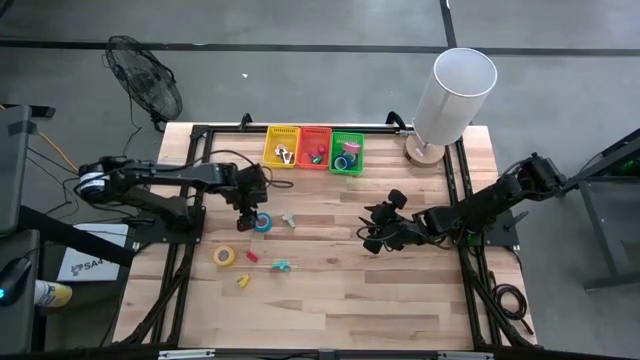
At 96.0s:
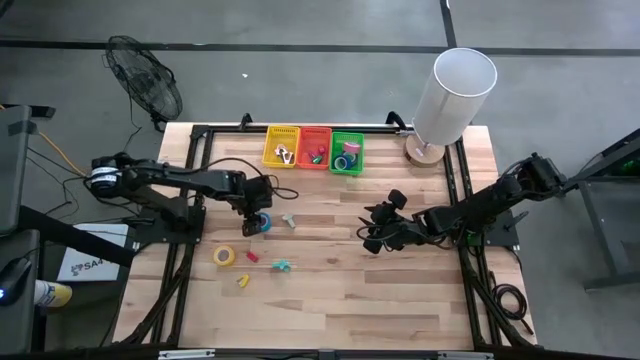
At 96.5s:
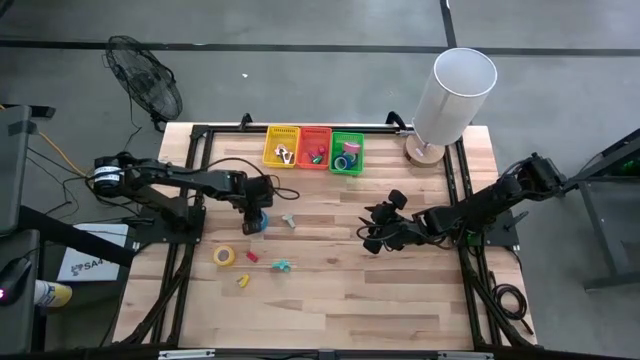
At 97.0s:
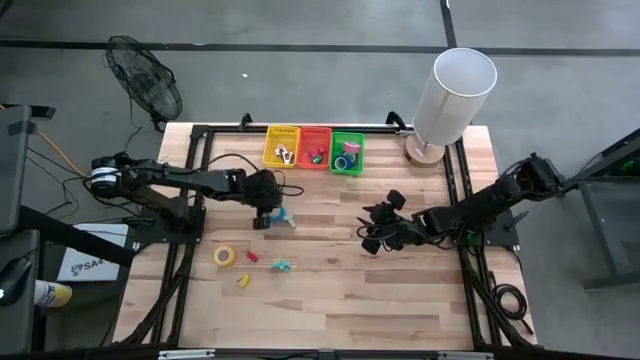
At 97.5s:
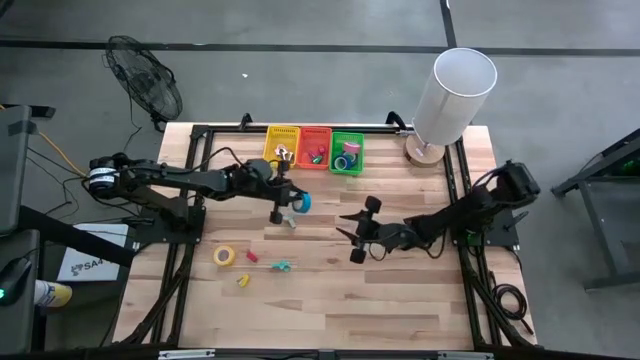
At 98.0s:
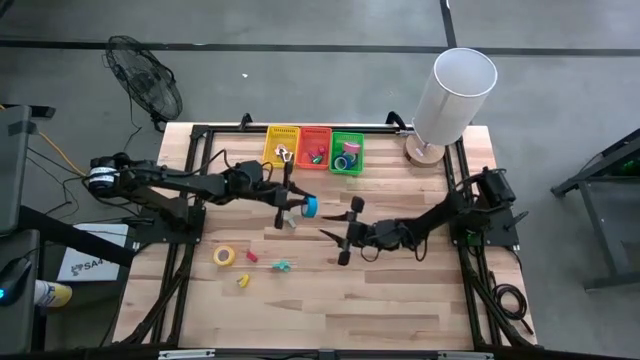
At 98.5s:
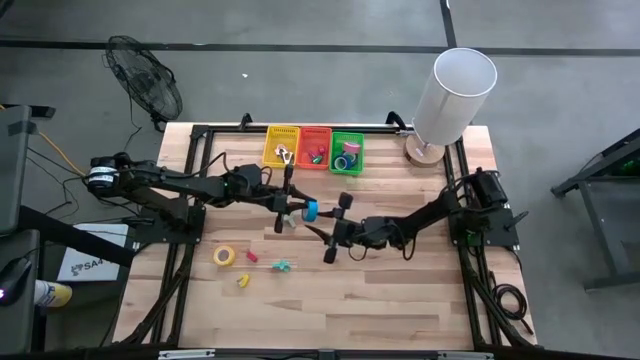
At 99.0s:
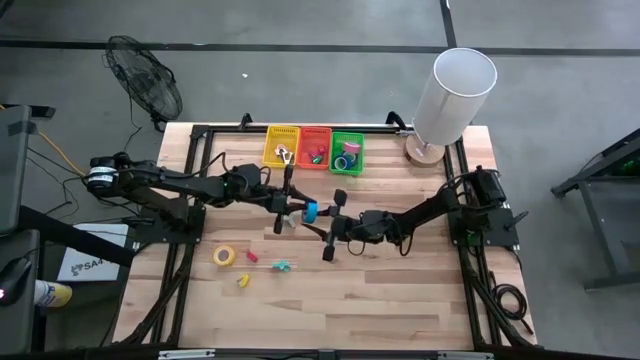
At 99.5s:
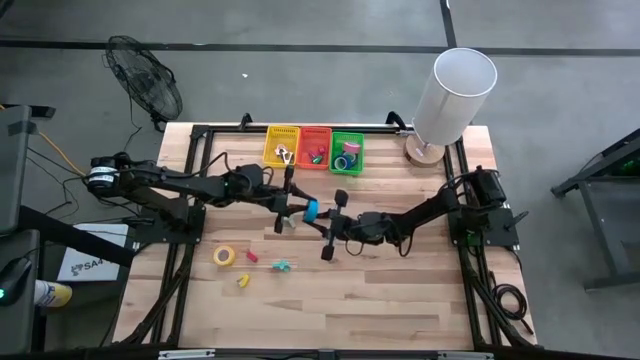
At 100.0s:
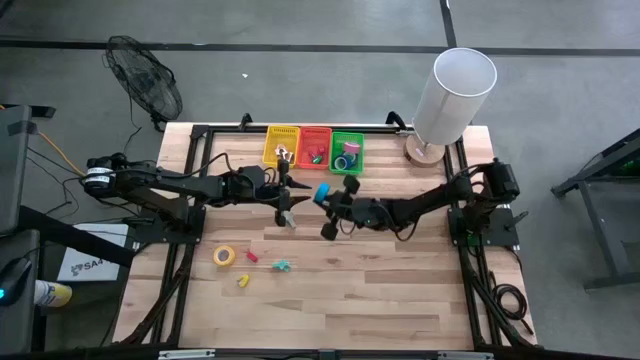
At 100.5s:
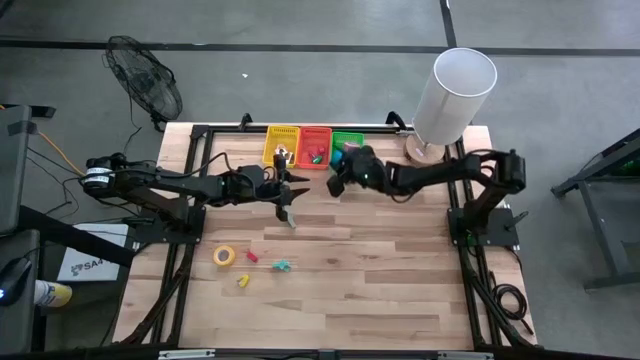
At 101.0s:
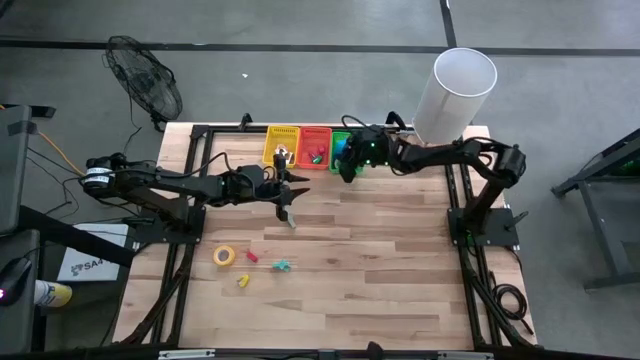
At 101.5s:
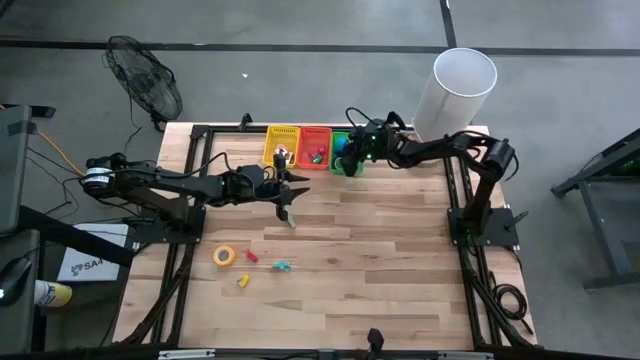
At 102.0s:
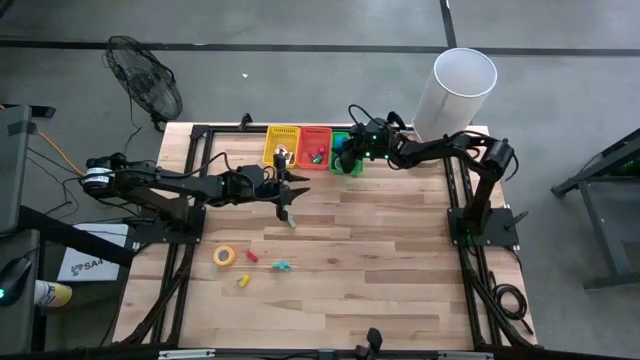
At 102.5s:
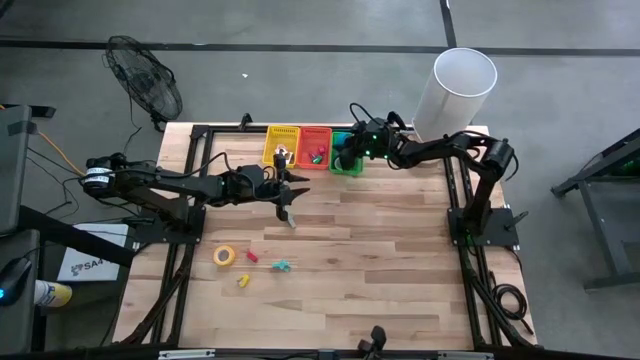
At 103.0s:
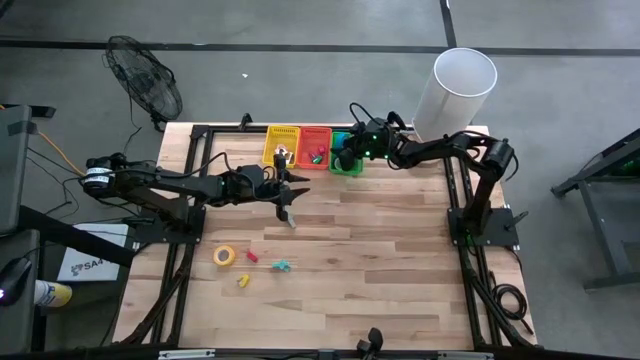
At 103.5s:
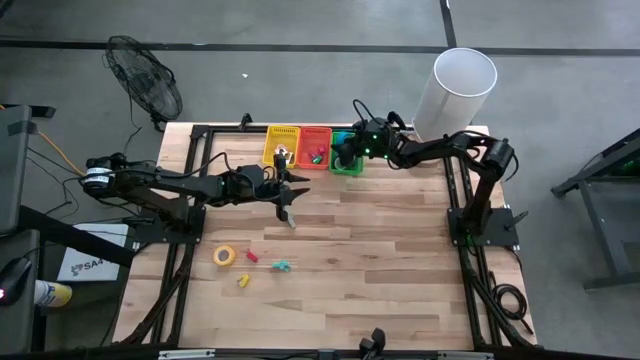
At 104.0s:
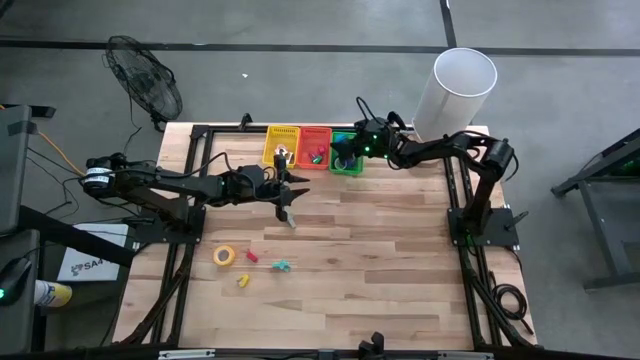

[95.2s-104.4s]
Task: Pick and place Stapler, Stapler remover, tape
Put the light blue tape into the green basket

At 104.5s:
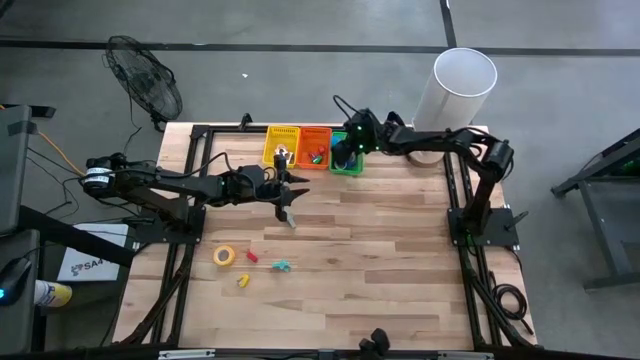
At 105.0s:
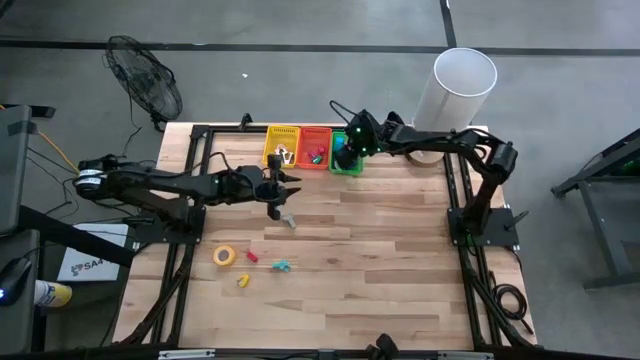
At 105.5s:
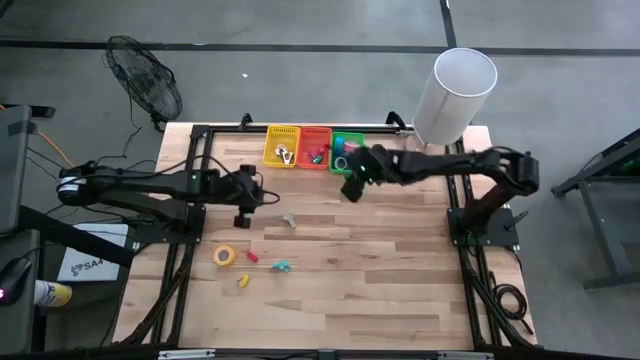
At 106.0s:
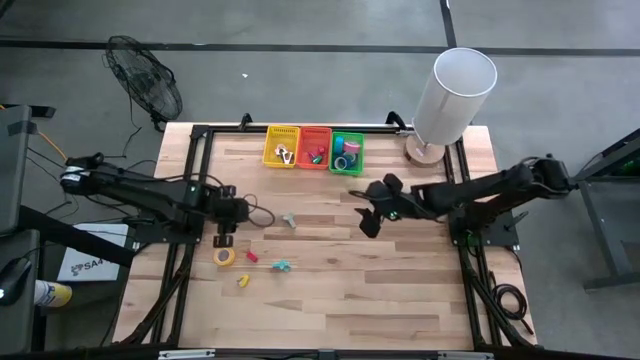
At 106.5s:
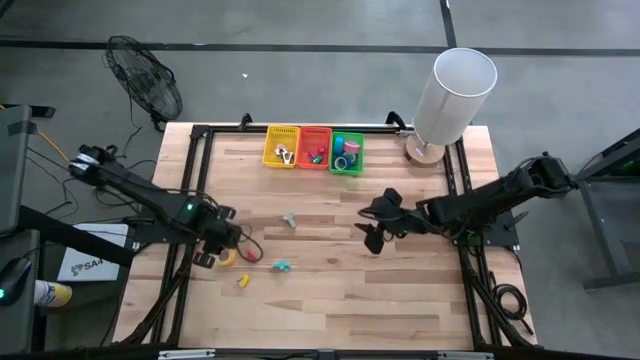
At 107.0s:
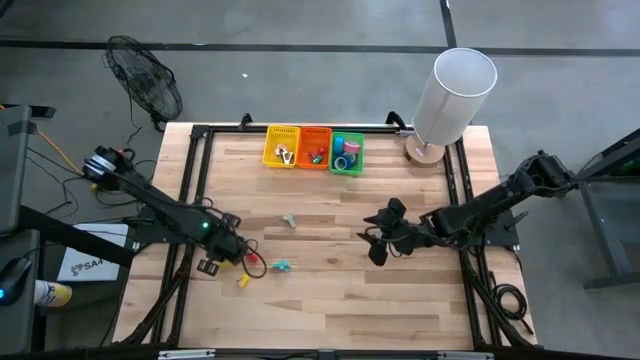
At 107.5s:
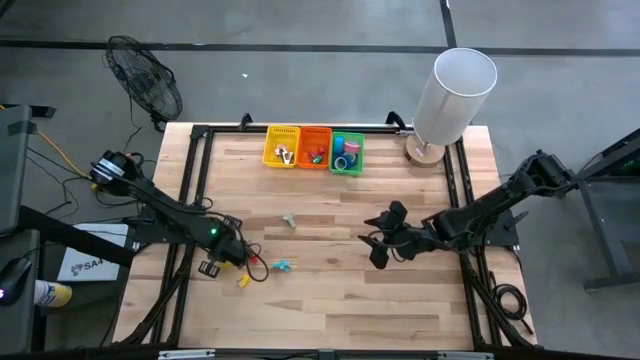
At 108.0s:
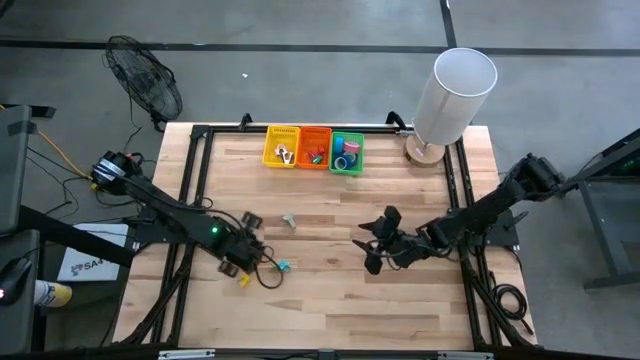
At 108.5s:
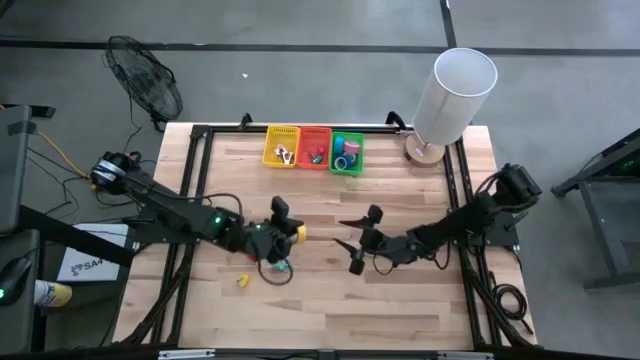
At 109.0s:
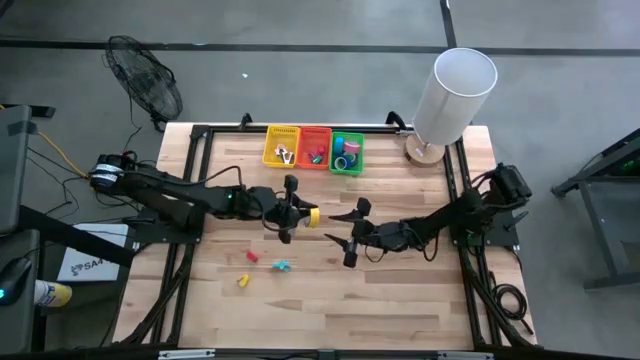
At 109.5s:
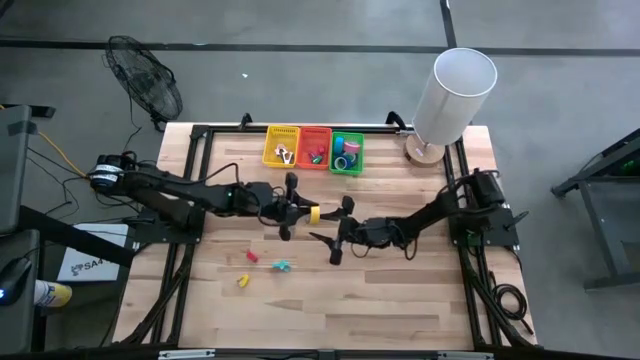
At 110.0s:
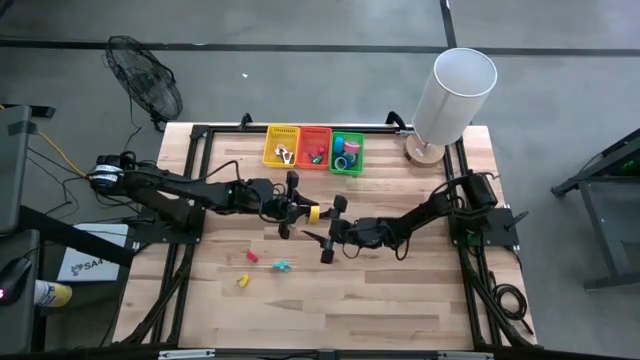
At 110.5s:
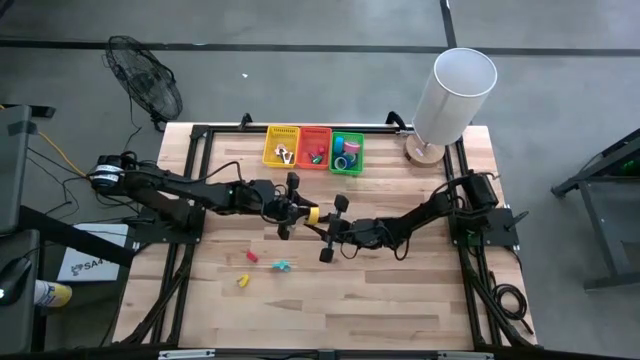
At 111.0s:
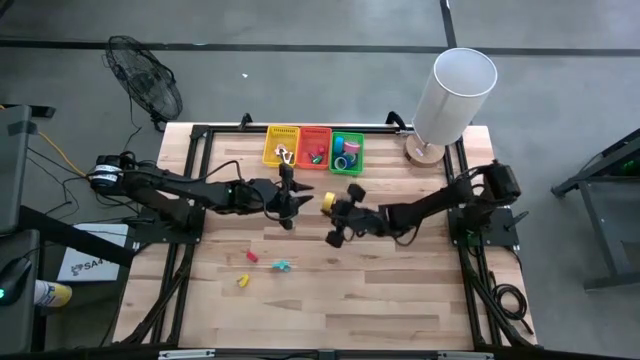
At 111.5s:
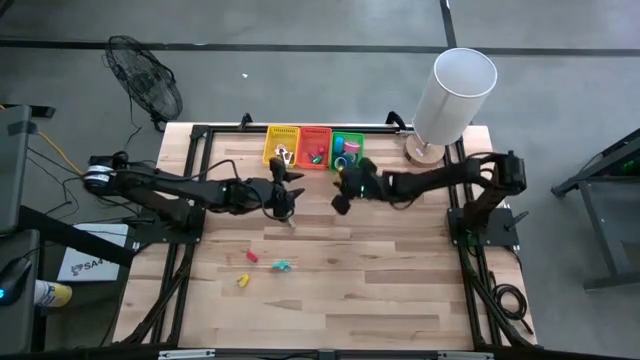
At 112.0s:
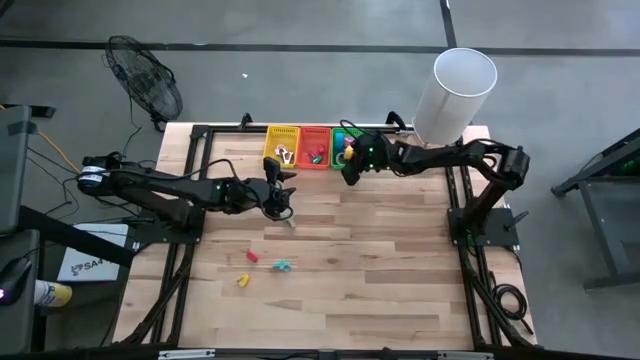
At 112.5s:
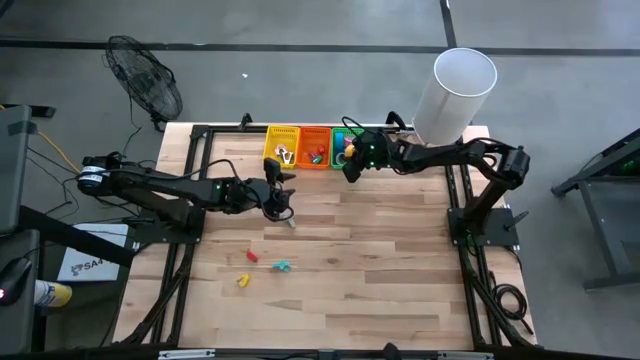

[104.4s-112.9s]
Put the yellow tape into the green basket

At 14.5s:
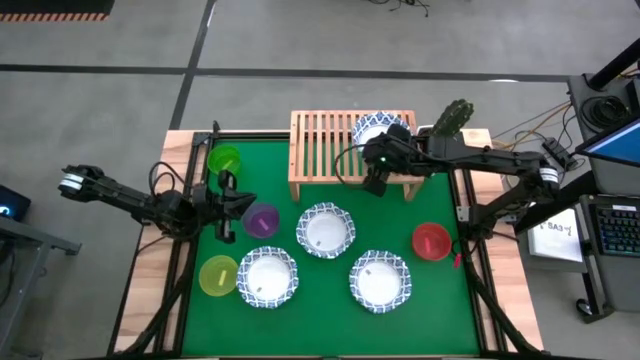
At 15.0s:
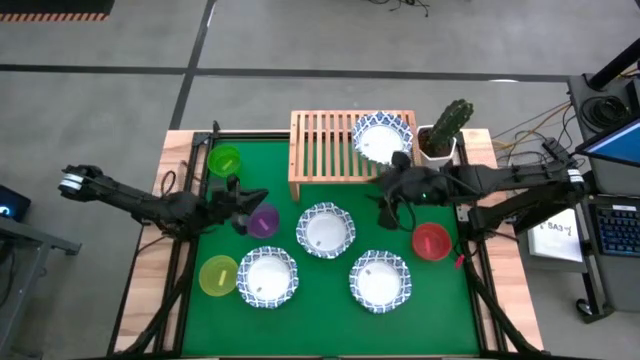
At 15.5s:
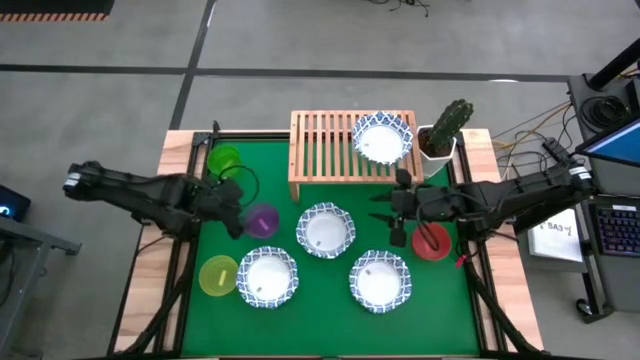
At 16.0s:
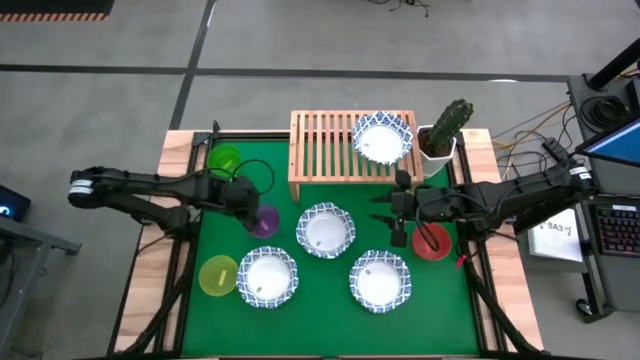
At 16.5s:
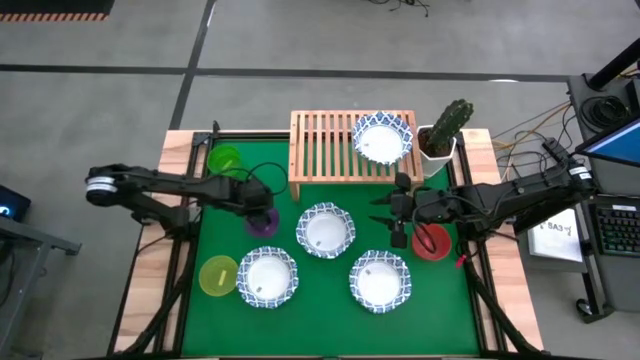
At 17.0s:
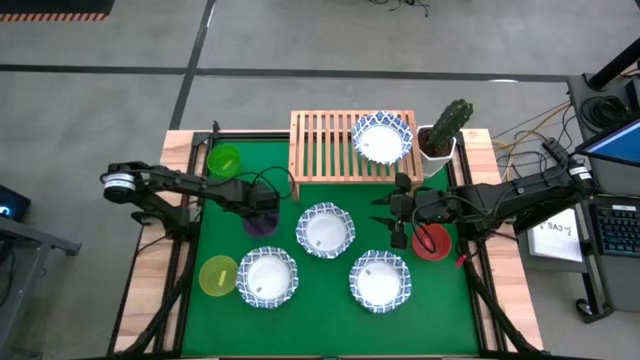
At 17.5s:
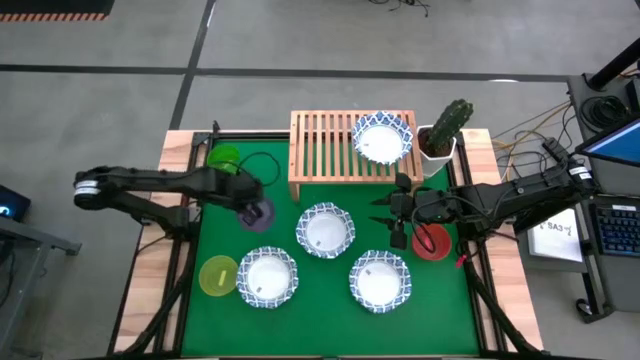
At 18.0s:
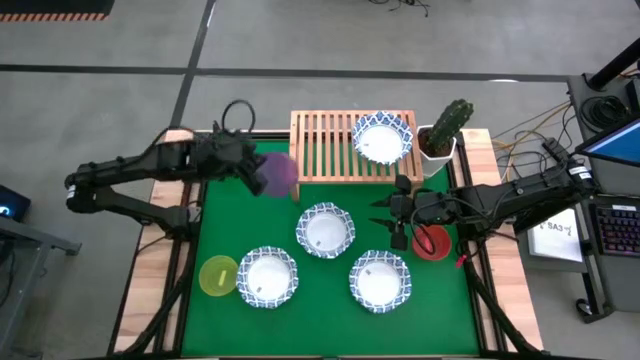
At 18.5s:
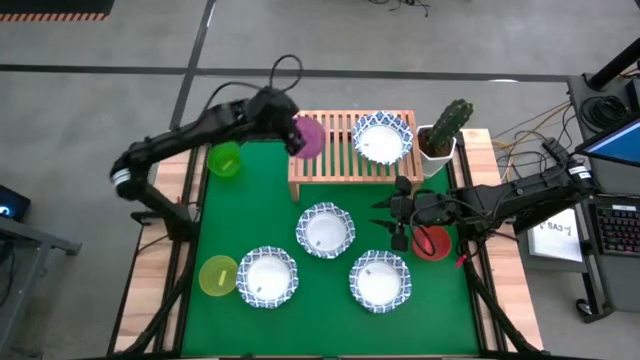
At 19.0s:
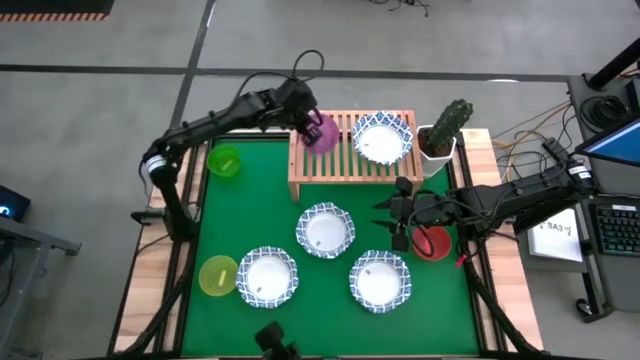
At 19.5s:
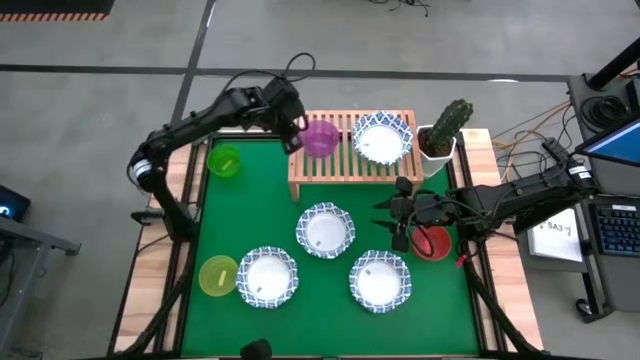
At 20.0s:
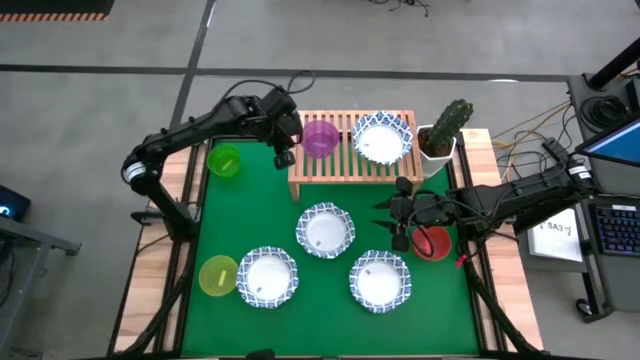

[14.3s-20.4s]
Task: Place and stack bowls onto a shelf
Put the small violet bowl on the shelf
